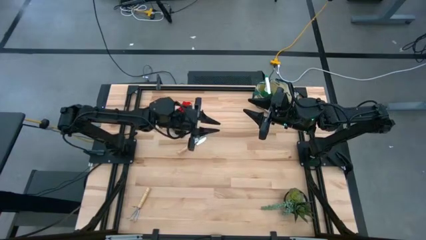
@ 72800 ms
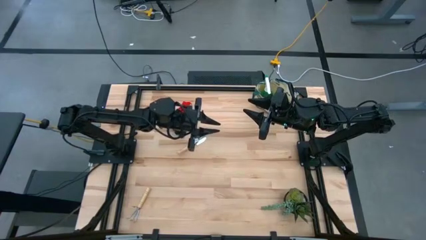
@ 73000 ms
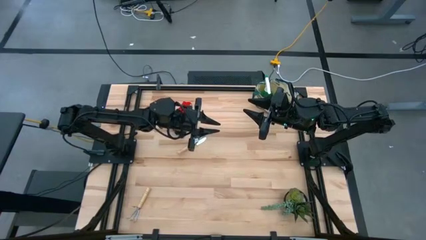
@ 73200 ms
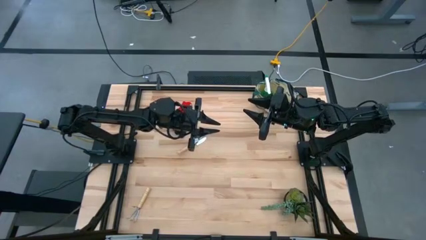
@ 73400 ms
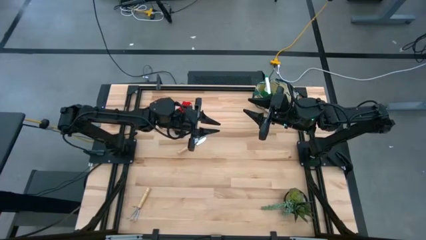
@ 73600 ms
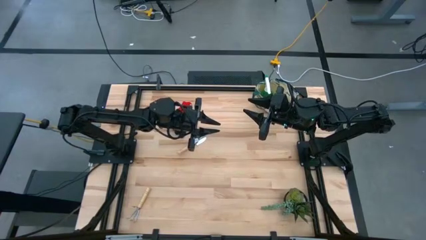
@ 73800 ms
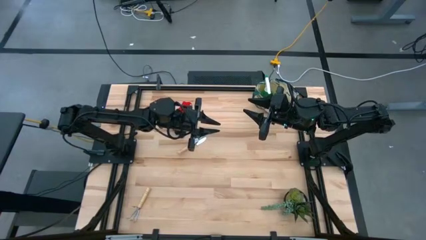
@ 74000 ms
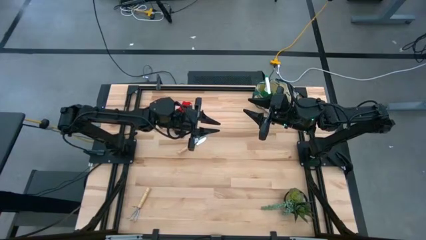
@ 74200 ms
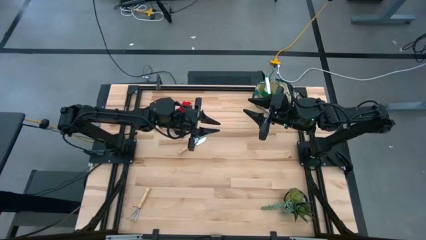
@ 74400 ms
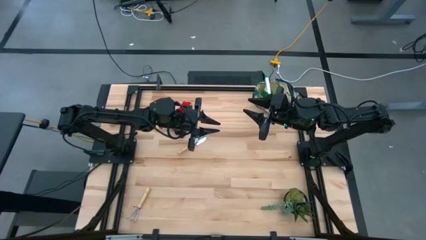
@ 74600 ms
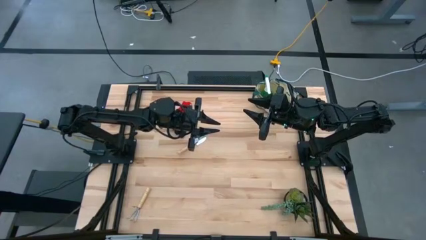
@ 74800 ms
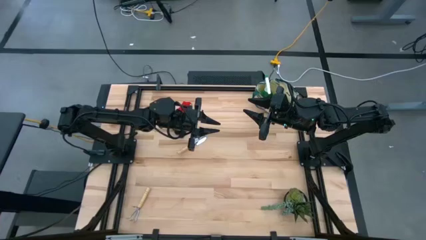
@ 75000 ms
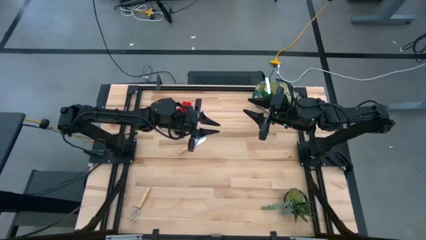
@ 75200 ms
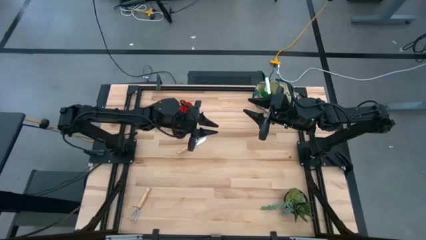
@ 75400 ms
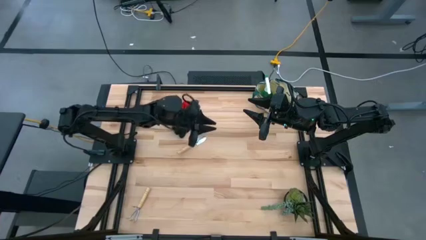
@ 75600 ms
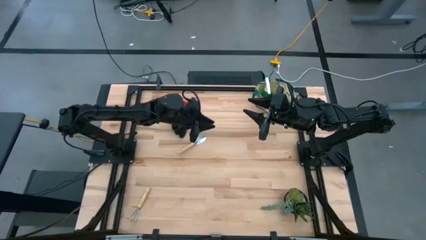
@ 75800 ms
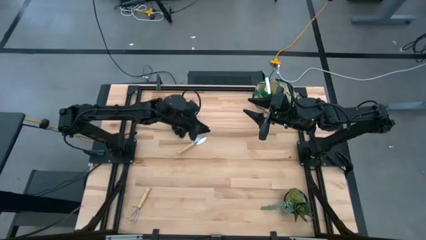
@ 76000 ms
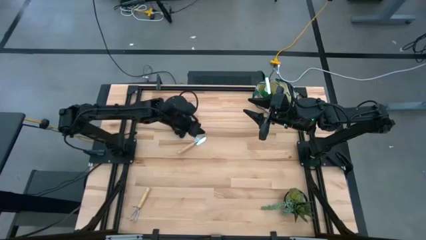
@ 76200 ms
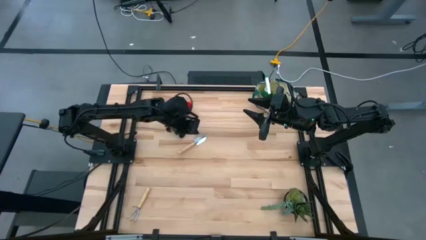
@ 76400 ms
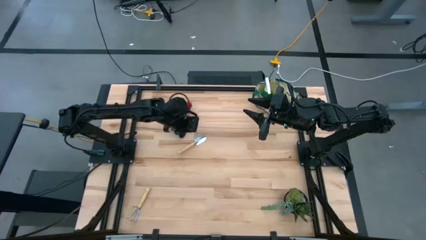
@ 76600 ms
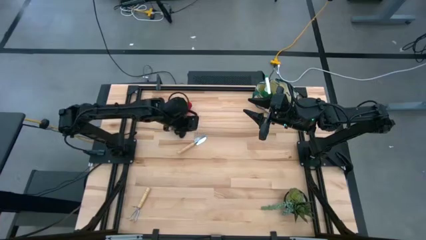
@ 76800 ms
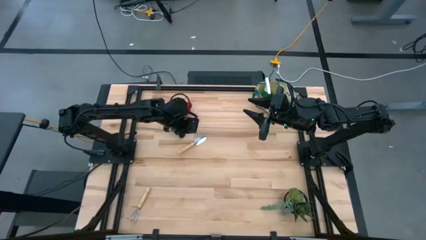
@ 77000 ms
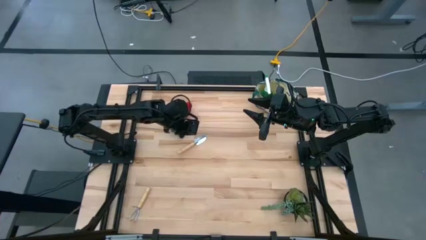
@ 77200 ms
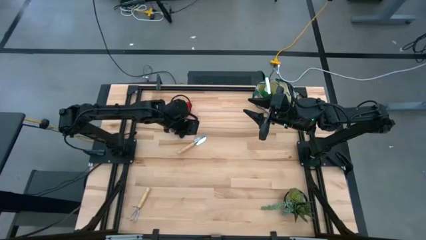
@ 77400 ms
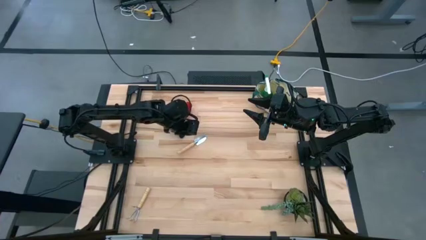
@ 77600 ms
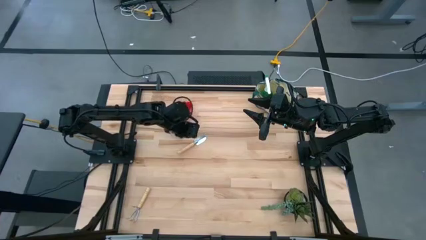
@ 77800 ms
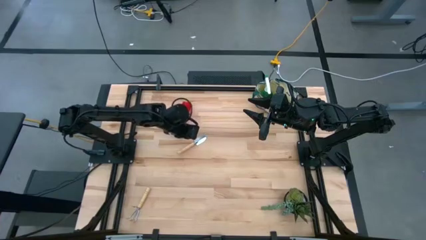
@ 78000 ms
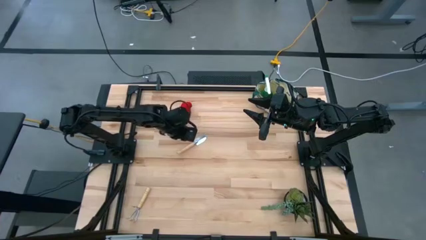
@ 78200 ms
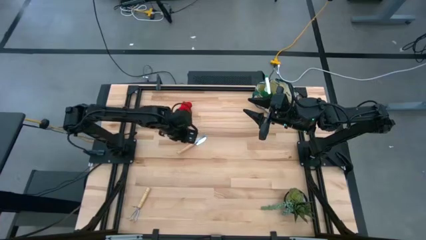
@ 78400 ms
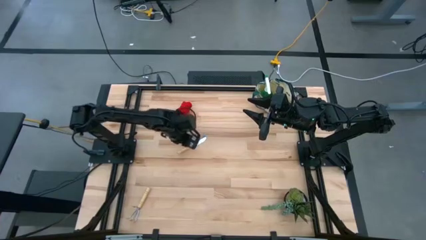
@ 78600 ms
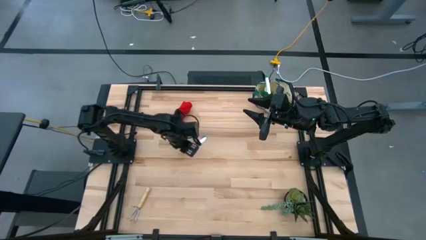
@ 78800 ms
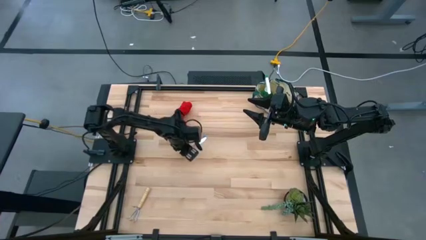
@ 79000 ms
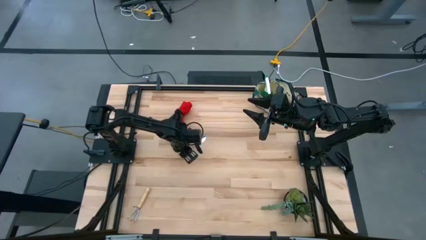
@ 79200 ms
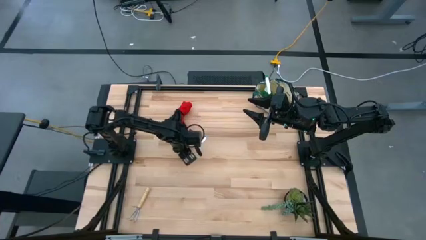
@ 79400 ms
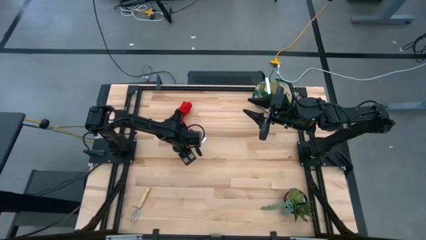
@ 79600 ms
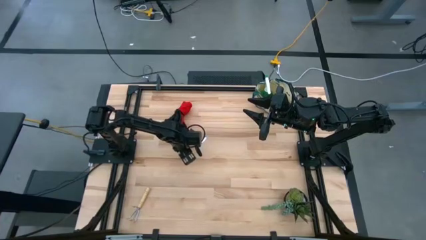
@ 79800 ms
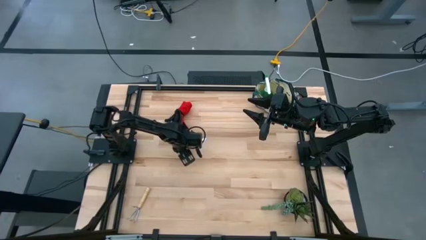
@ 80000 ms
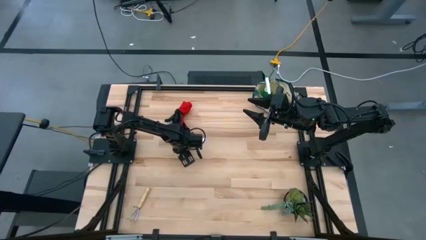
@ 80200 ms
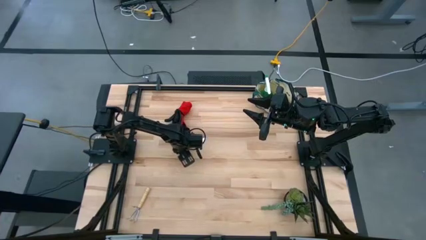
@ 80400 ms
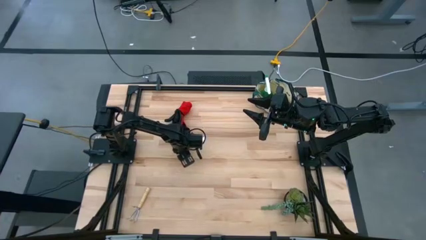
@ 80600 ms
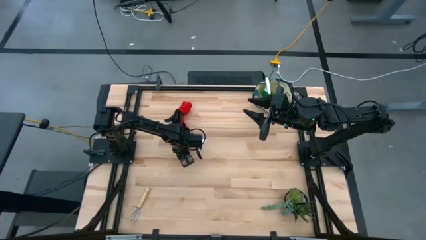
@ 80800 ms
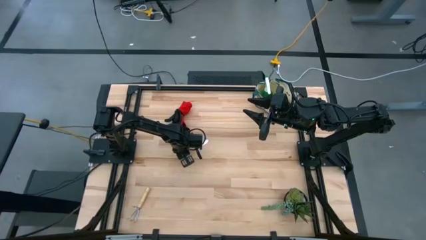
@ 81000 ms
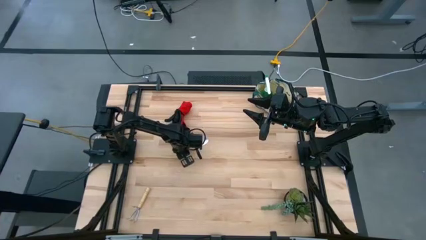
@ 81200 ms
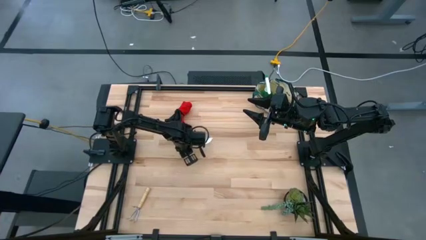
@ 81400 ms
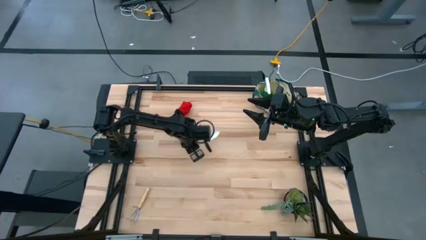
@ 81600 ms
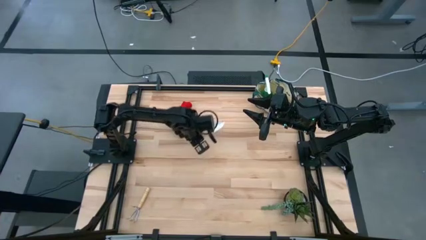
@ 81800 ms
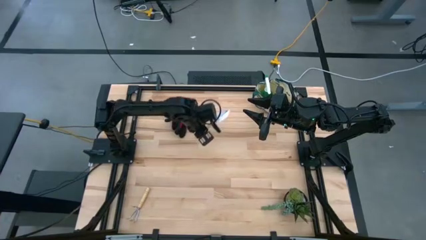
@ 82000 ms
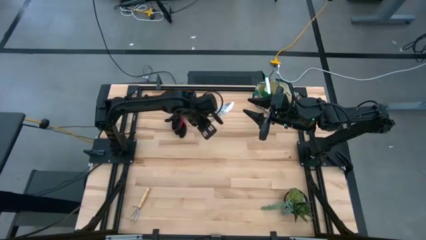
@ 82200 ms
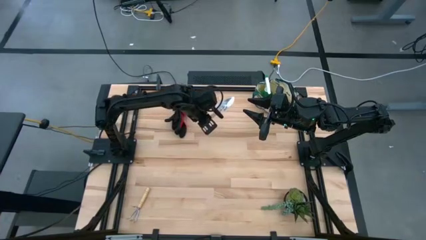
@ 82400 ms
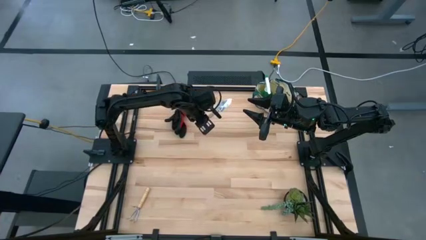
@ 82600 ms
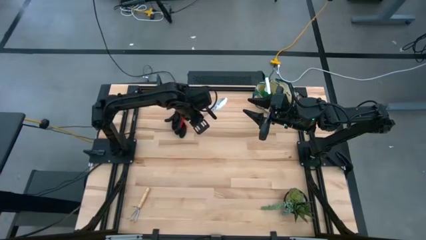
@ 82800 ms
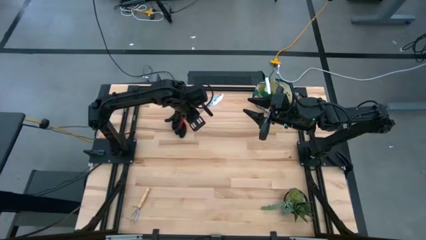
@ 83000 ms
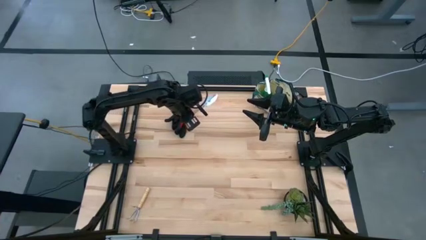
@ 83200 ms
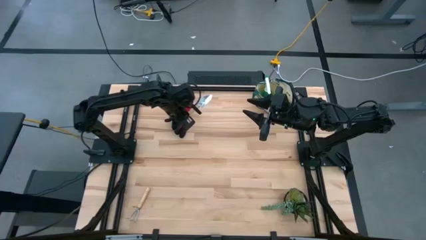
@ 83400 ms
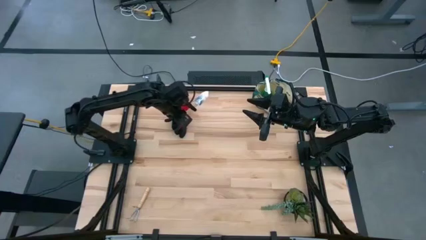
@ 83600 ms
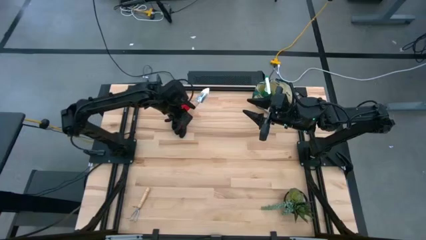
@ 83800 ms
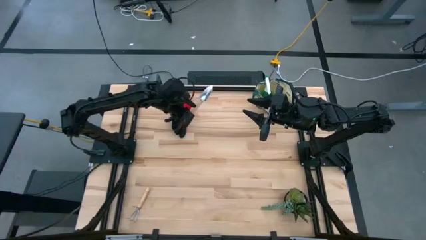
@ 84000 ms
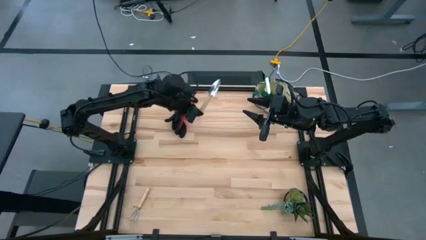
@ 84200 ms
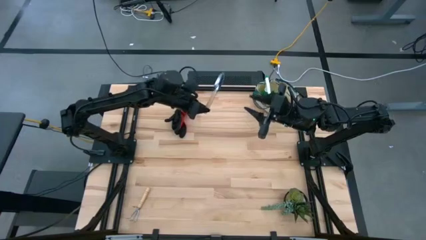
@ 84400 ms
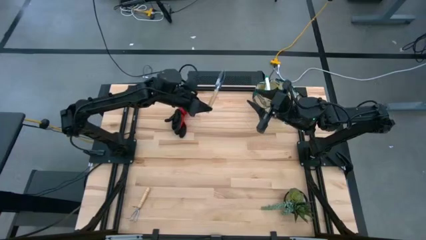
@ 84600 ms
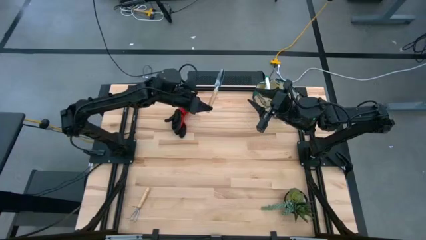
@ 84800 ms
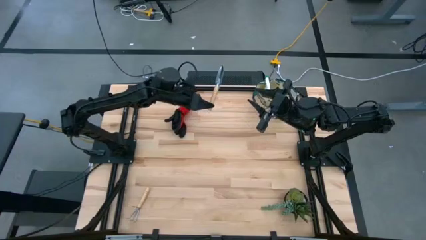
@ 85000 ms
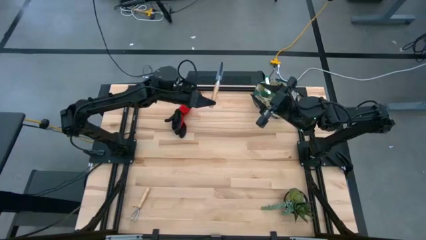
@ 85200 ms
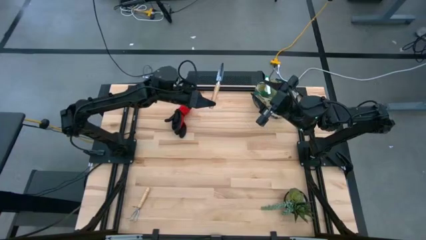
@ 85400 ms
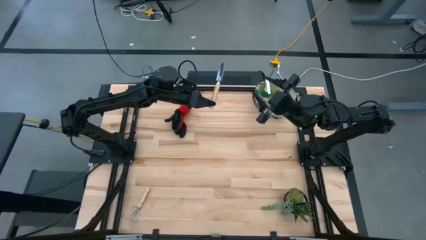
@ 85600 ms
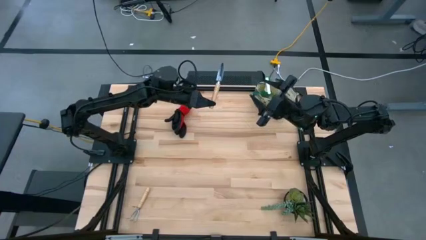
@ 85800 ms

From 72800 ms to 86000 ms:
Task: Pick & Place Garden tools in Gardening bag
Put the brown trowel into the gardening bag

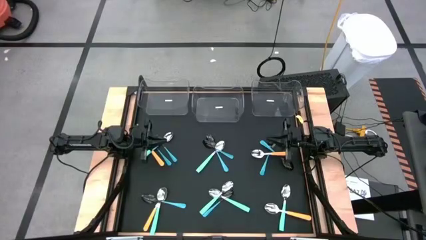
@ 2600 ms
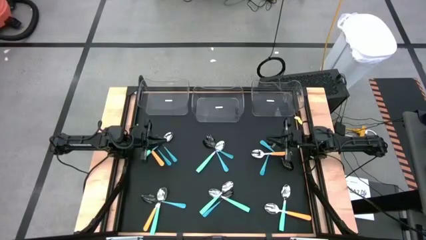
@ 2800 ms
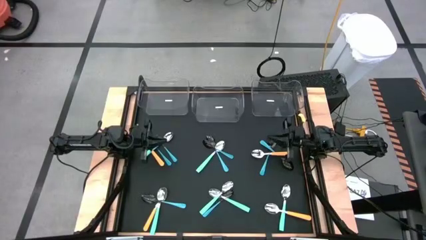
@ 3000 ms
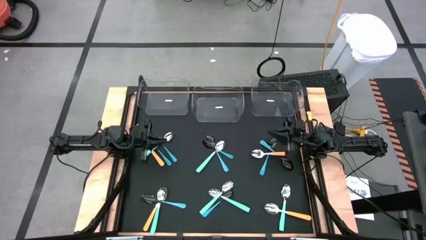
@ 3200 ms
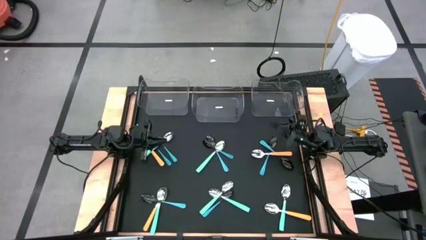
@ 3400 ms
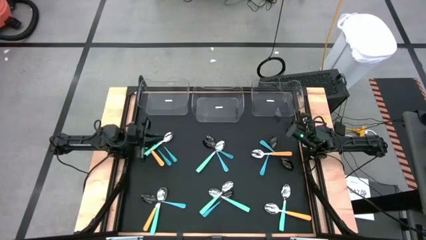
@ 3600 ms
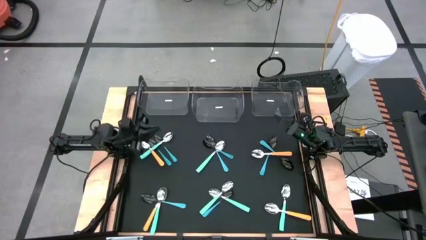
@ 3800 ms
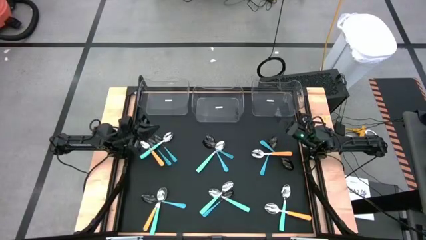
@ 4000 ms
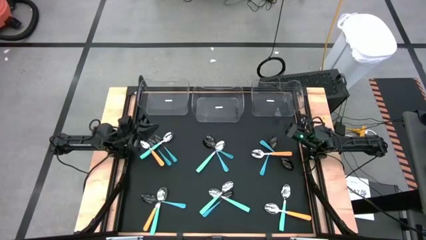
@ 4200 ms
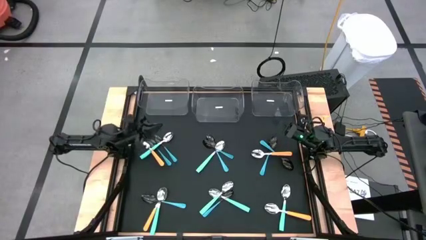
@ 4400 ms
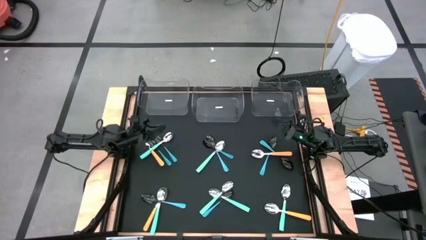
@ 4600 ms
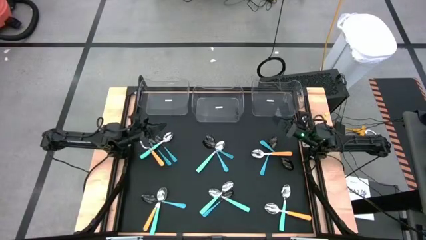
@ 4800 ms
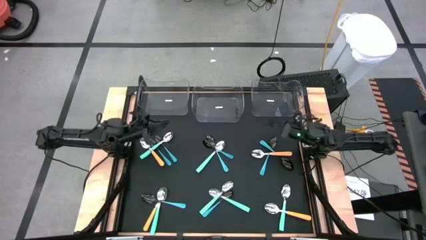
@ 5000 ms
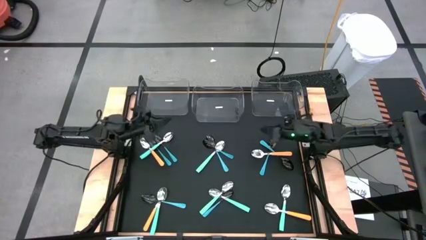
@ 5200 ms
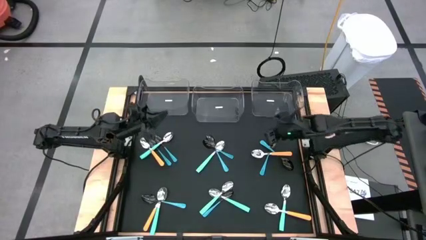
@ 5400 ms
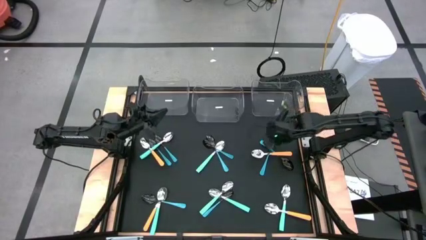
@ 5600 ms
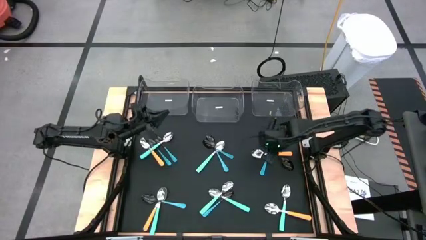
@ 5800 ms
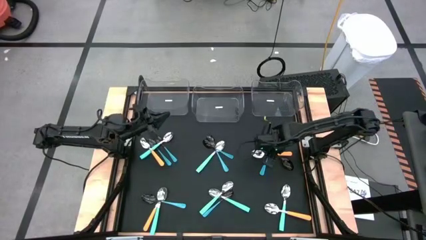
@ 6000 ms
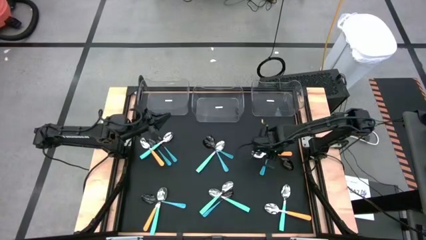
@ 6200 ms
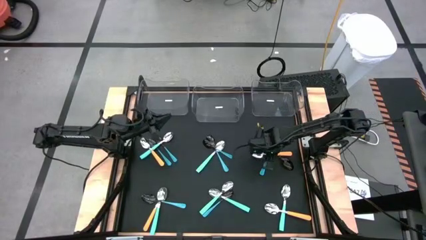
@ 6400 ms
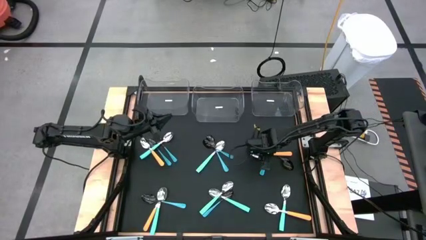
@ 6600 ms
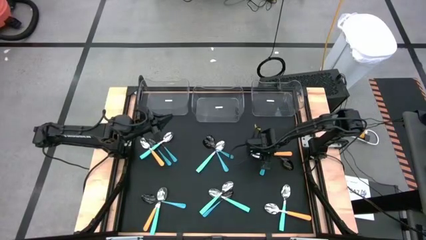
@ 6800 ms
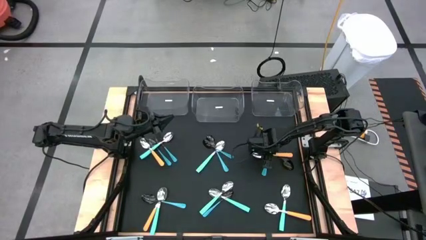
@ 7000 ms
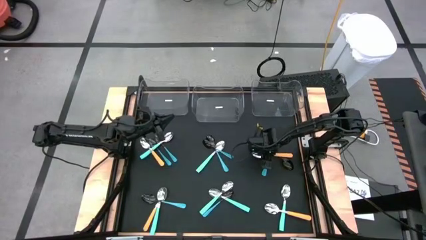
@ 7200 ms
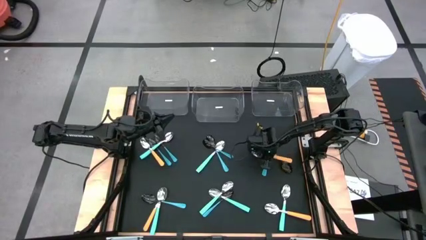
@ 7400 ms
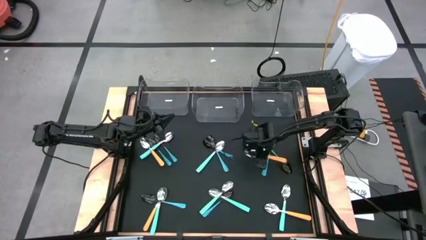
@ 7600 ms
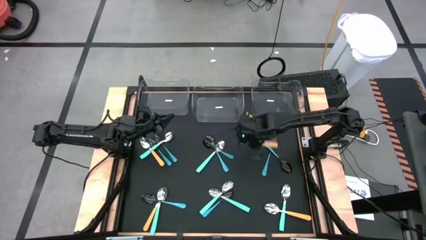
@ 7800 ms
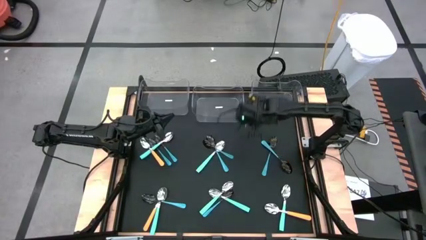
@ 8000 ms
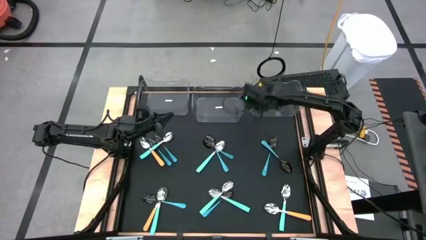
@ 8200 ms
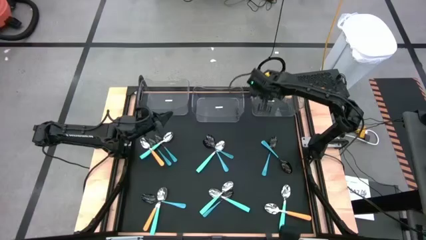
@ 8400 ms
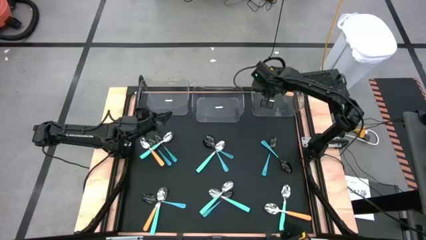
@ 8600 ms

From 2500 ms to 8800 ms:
Task: Sort silverware by color (type)
Put the orange spoon into the right transparent bin
